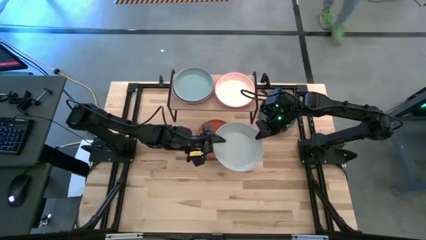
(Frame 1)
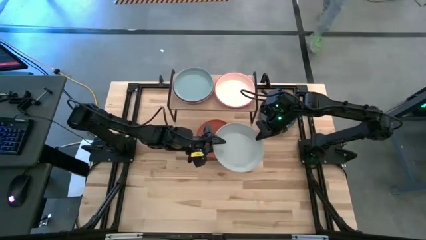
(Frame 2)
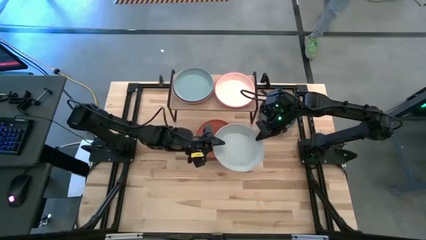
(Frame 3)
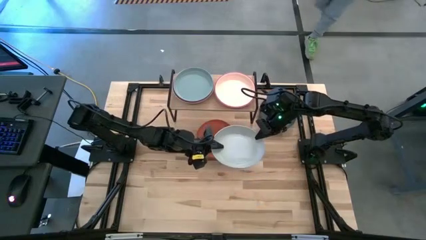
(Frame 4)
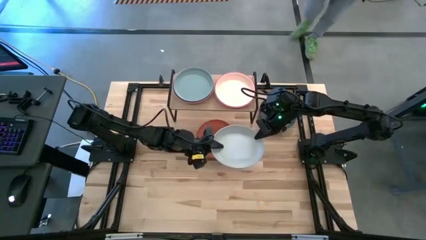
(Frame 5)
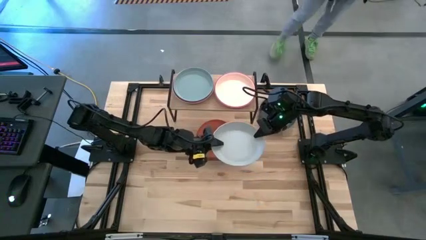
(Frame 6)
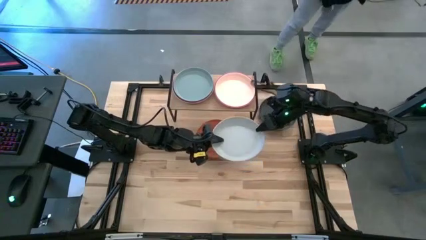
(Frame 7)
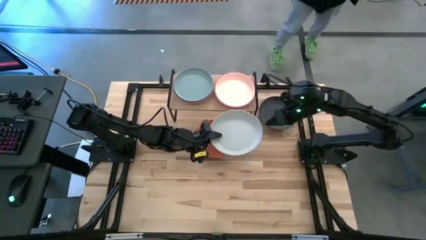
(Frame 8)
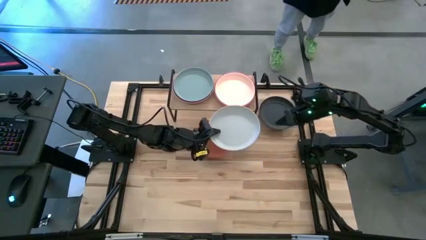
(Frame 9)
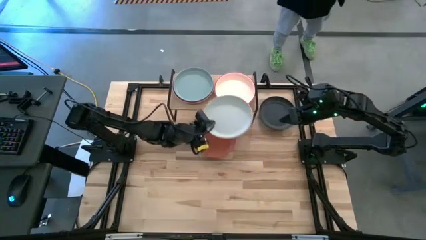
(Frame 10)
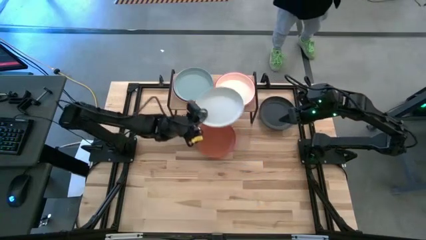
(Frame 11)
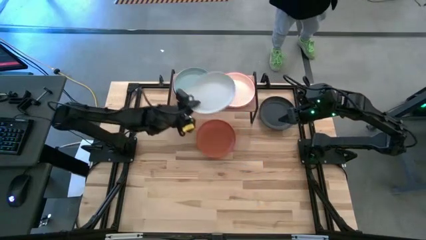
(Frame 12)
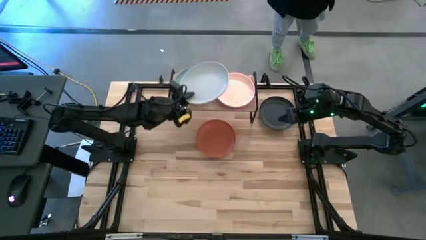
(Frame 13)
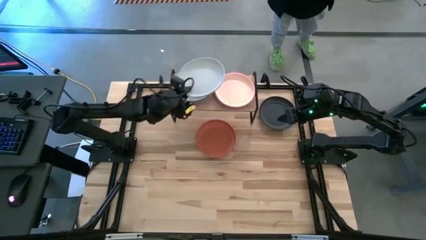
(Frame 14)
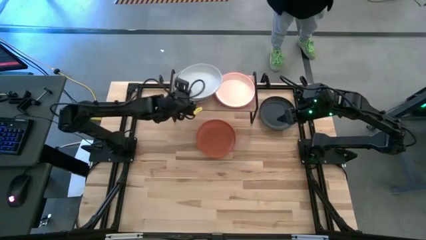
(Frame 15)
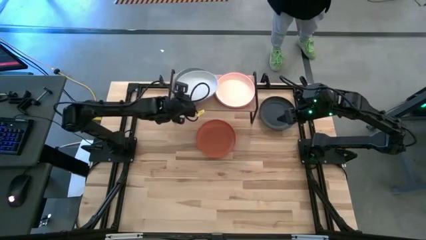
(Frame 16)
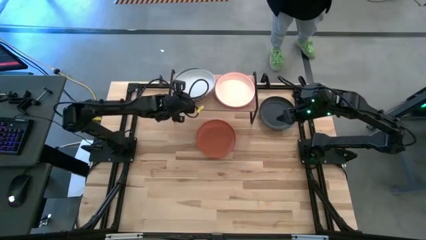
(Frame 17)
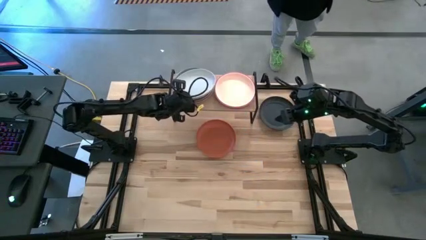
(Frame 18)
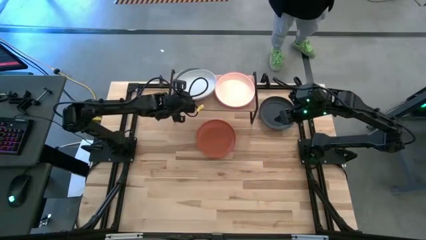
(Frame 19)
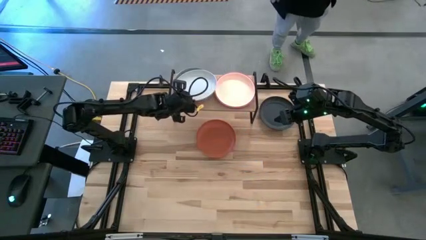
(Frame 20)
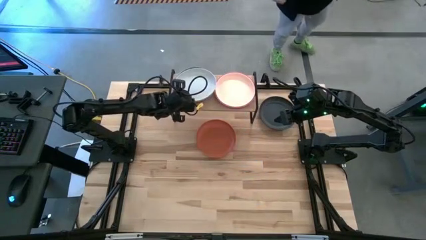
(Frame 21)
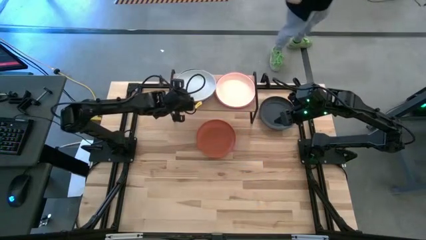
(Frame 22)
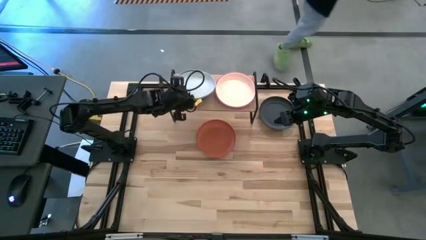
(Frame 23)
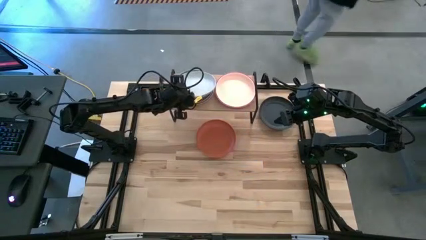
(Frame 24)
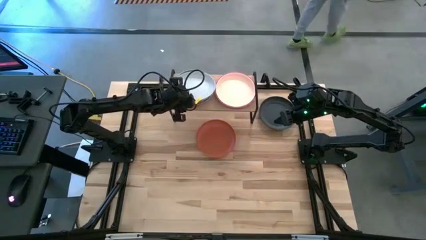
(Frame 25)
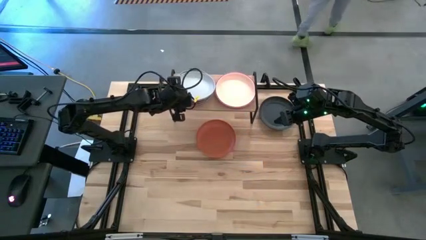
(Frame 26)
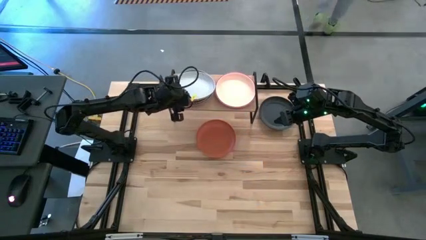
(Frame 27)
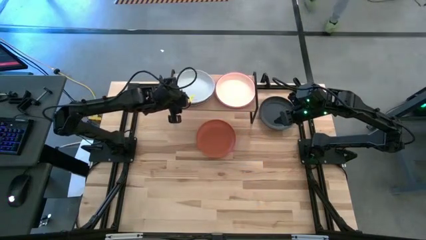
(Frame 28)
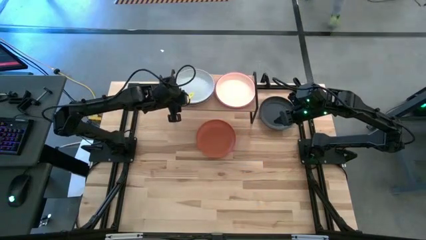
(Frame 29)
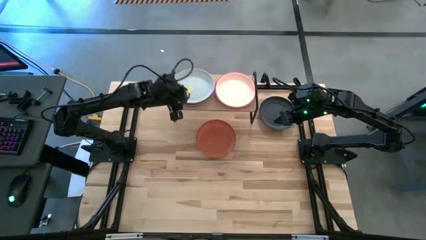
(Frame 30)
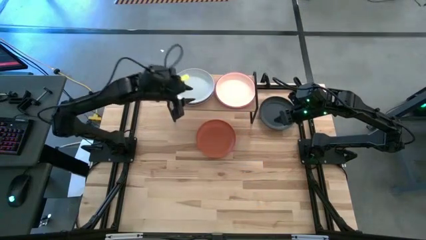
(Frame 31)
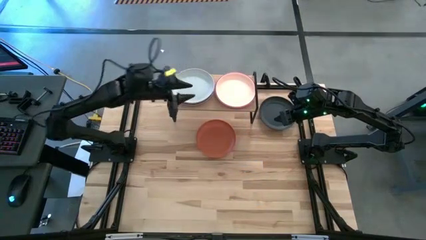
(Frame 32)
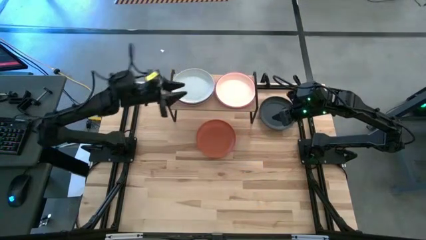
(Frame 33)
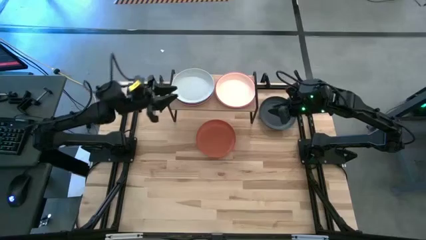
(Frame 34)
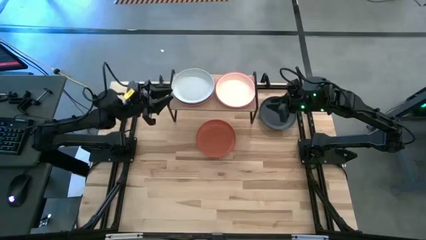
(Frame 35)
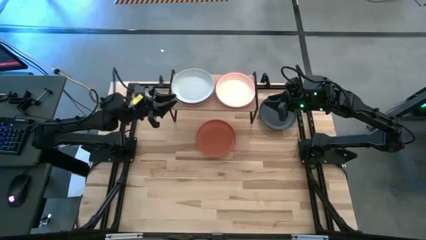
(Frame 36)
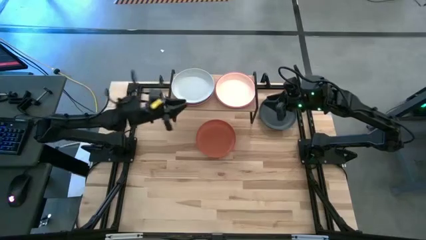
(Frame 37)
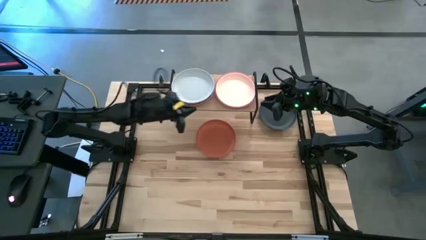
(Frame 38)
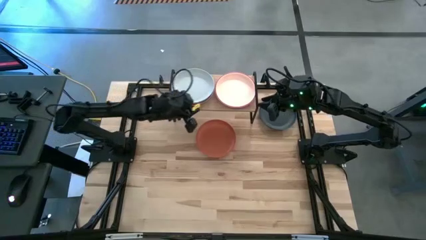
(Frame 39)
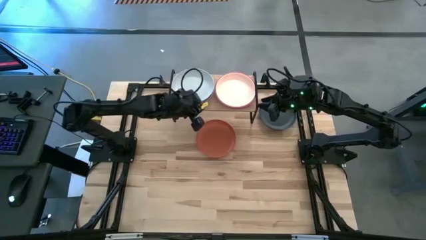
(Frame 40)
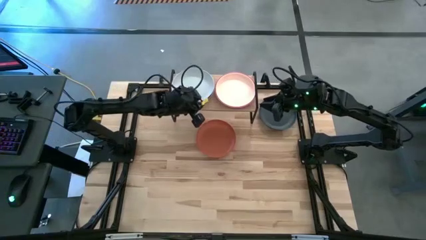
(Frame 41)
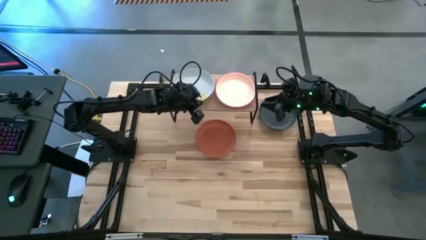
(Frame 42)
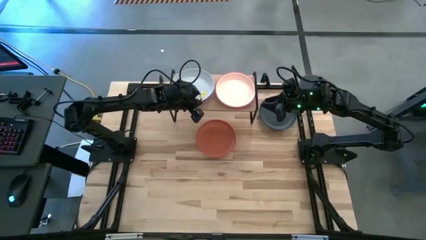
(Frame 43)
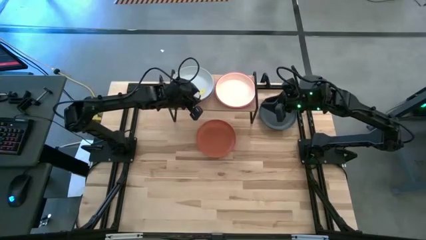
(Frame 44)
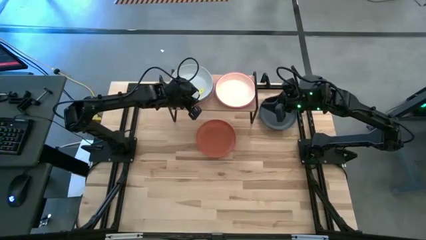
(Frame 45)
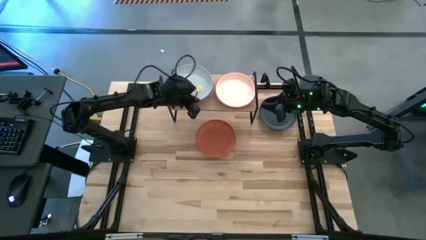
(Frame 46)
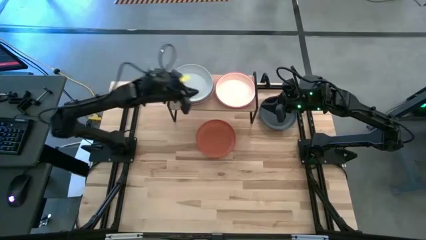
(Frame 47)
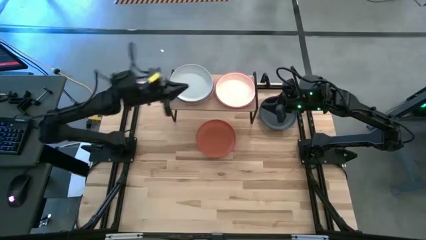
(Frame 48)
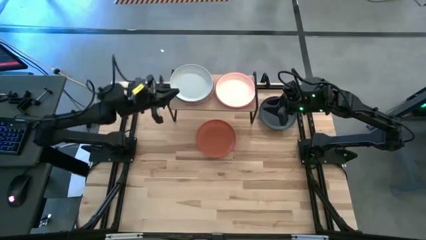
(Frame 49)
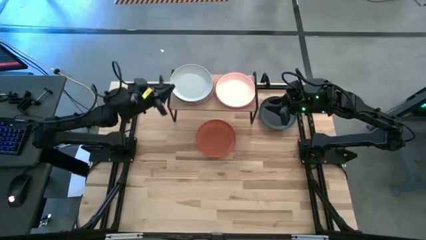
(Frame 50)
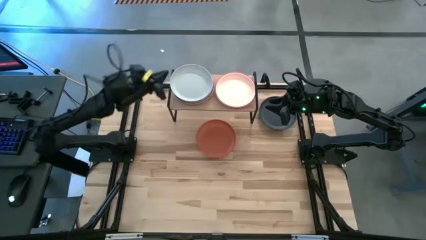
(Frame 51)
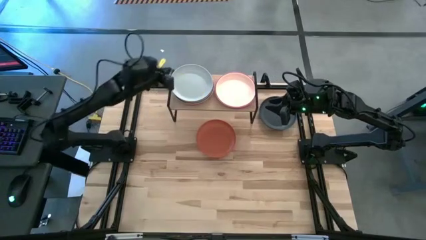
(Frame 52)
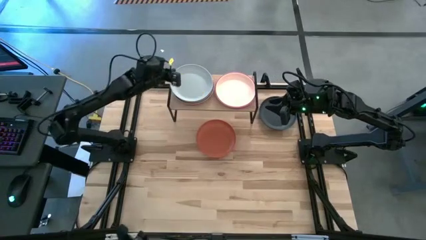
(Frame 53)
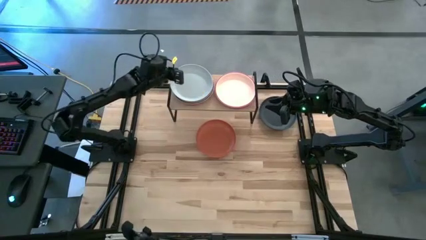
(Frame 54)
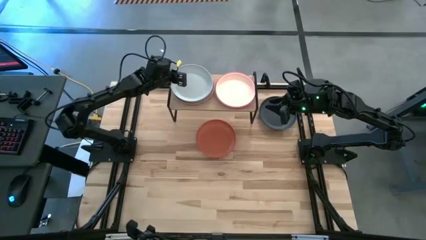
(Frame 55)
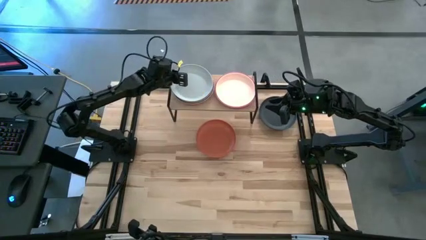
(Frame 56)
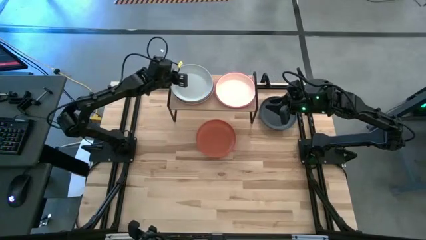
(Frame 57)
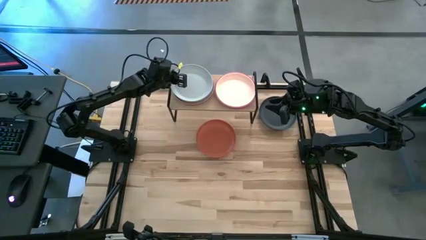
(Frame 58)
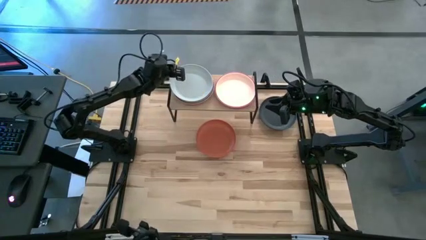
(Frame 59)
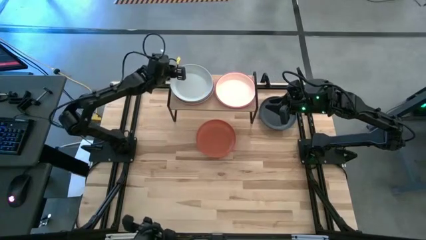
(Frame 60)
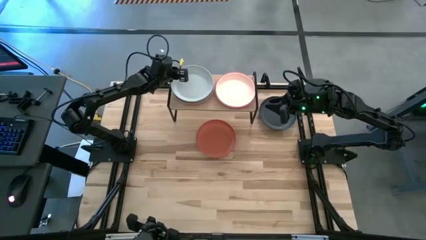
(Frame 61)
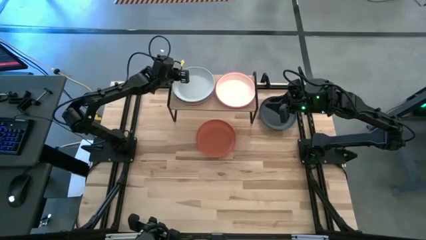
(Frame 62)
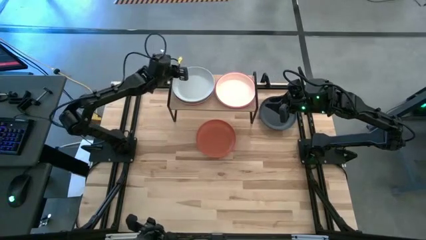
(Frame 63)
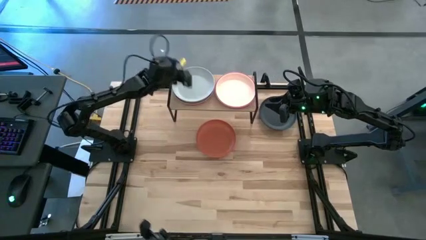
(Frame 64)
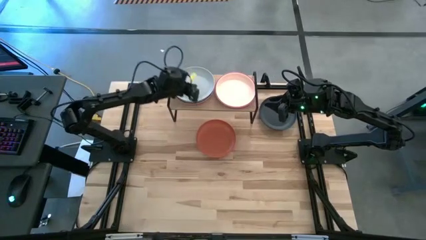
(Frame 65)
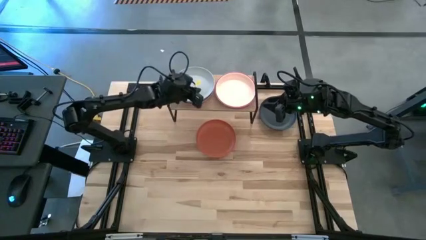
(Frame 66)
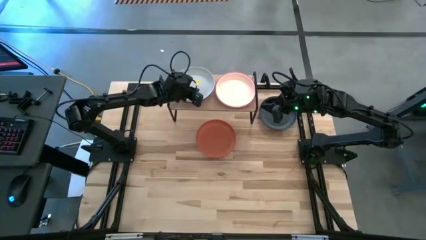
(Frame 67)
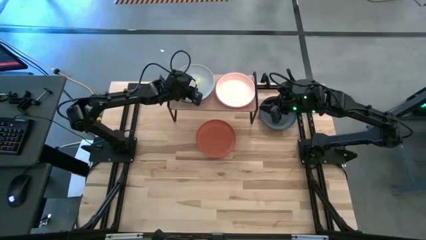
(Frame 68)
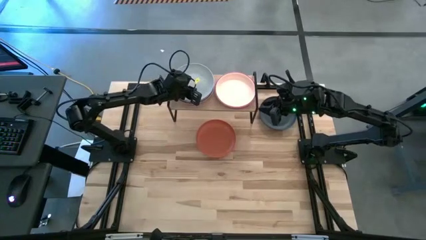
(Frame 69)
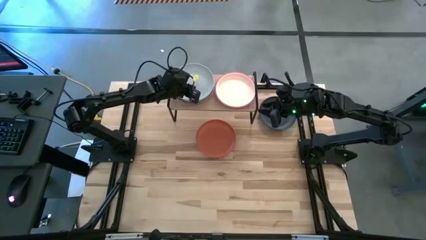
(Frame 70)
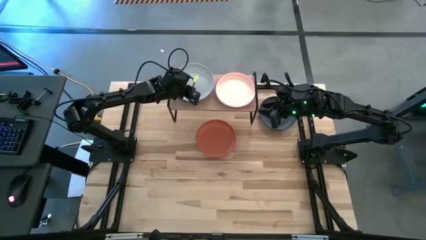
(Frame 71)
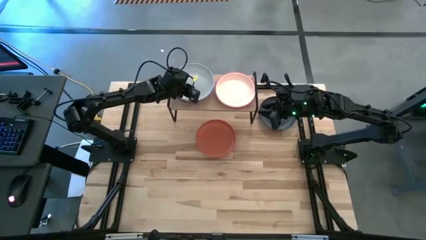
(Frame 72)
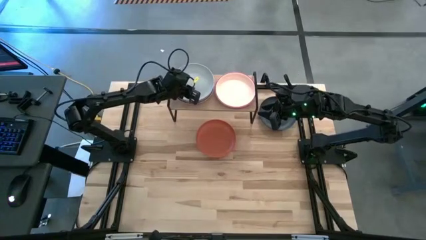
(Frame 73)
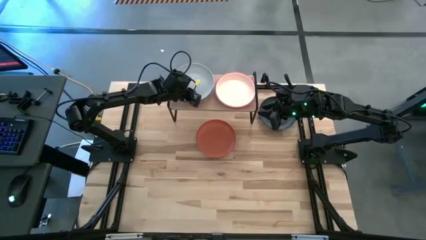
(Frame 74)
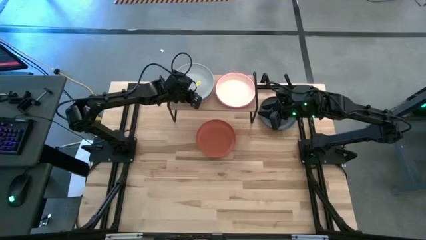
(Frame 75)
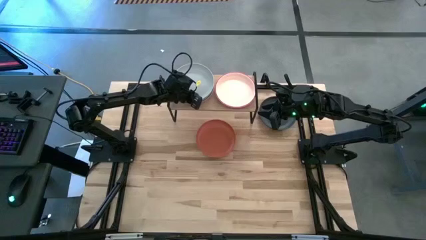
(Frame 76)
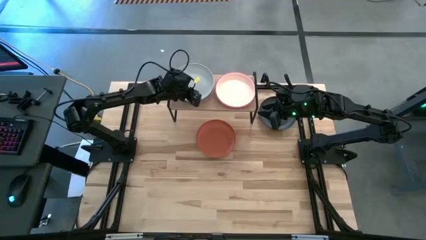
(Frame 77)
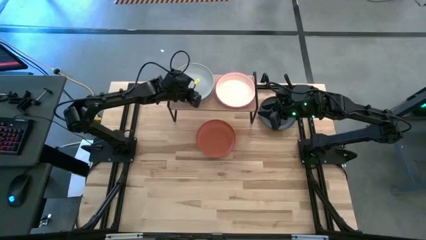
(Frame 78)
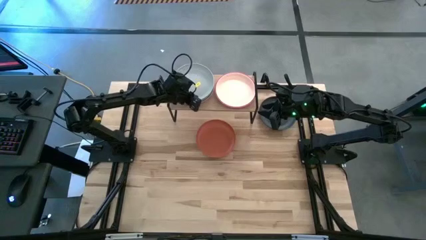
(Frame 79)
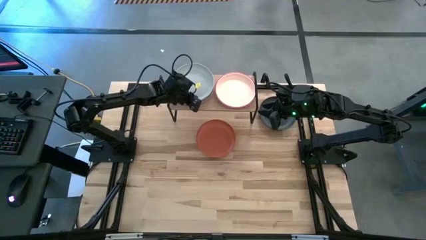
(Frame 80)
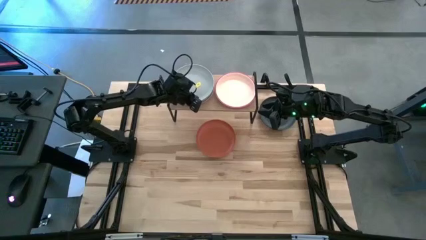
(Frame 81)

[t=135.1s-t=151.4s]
Task: Place and stack plates onto a shelf
Stack the white plate on top of the light blue plate
